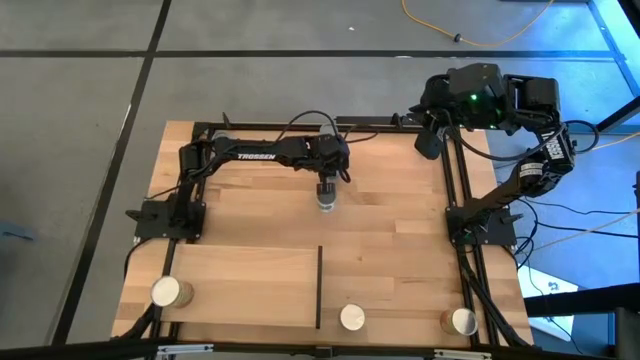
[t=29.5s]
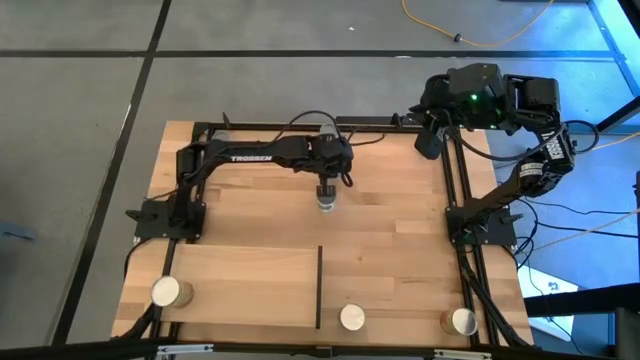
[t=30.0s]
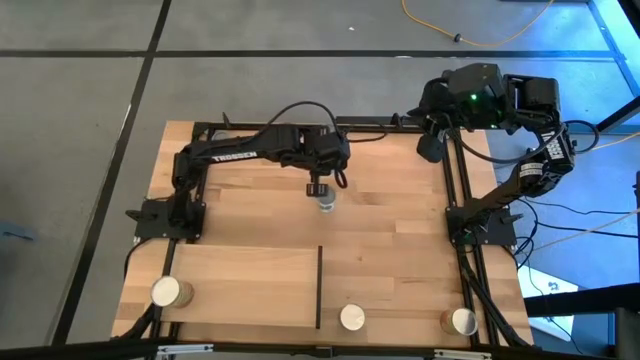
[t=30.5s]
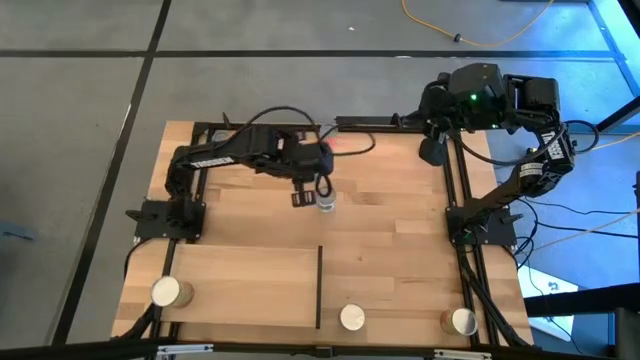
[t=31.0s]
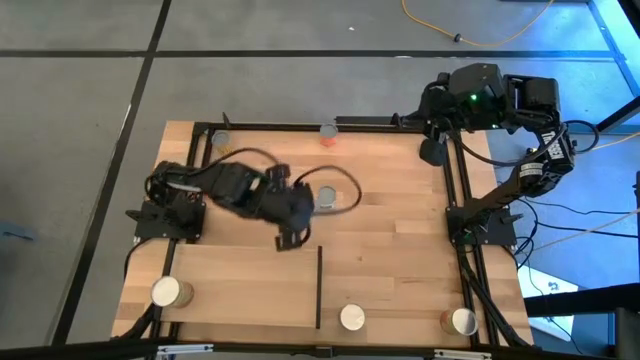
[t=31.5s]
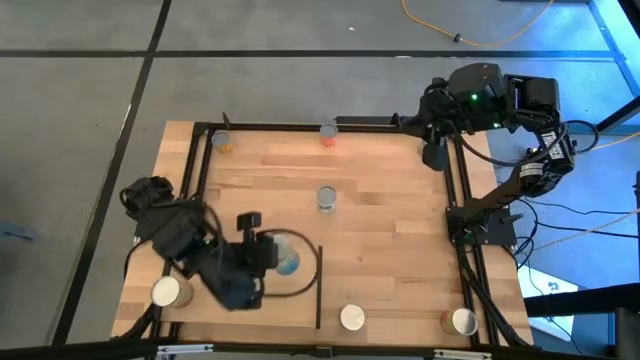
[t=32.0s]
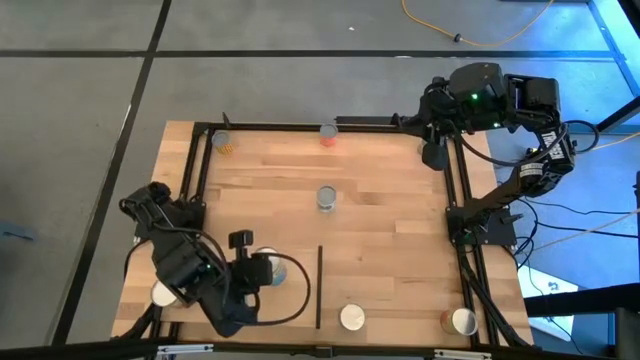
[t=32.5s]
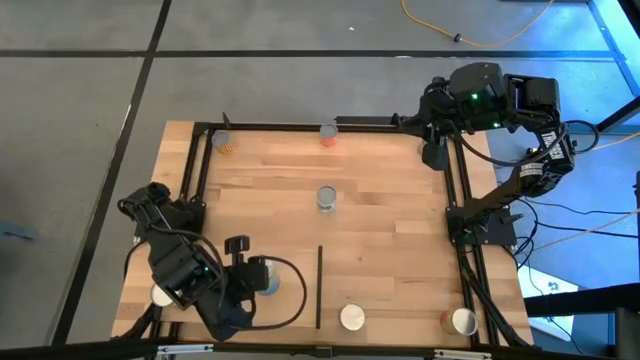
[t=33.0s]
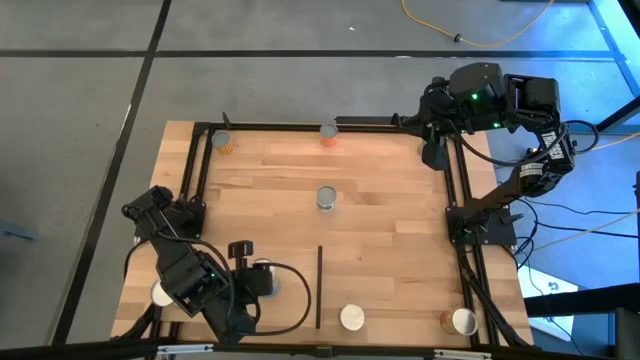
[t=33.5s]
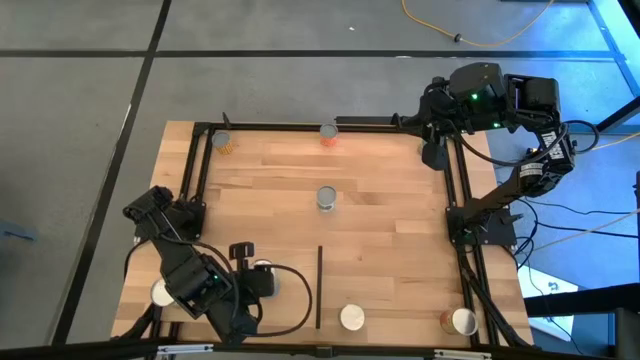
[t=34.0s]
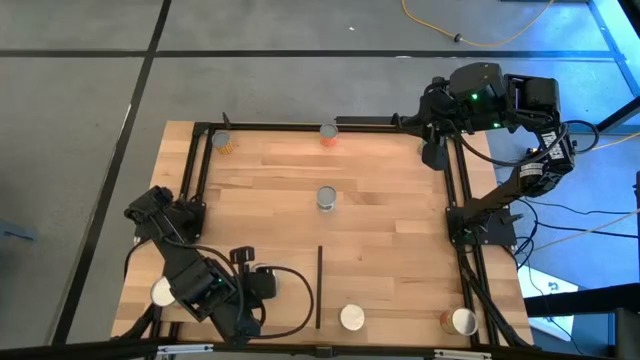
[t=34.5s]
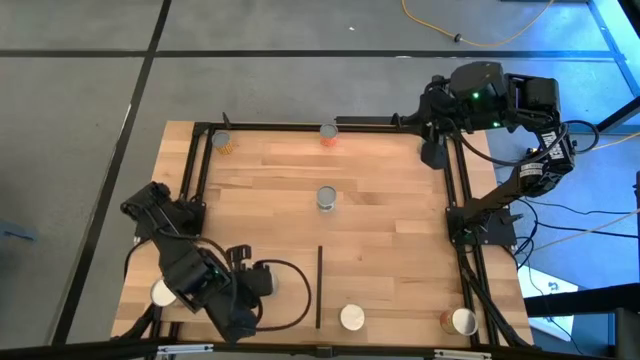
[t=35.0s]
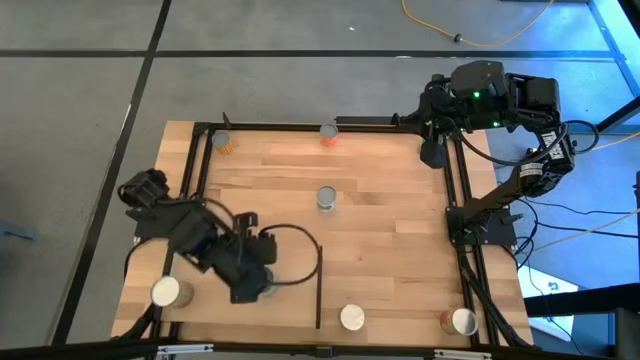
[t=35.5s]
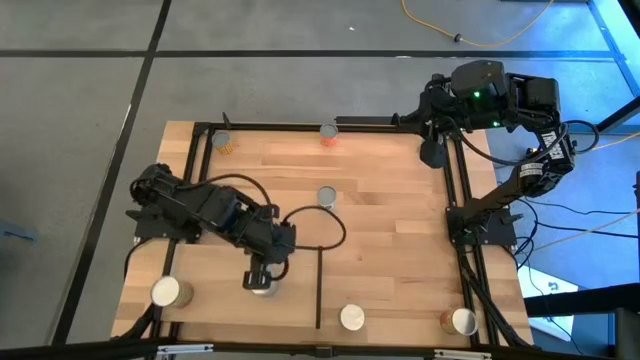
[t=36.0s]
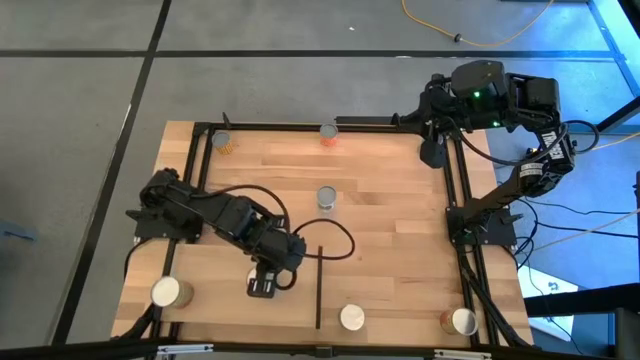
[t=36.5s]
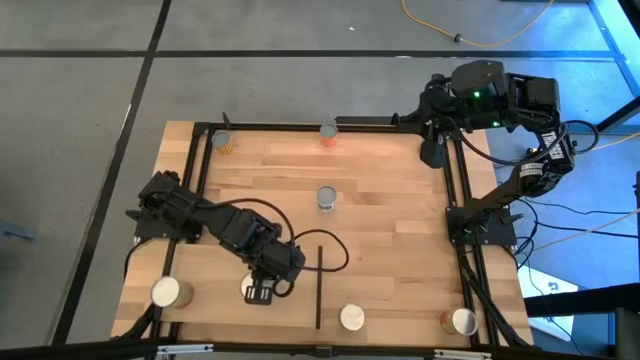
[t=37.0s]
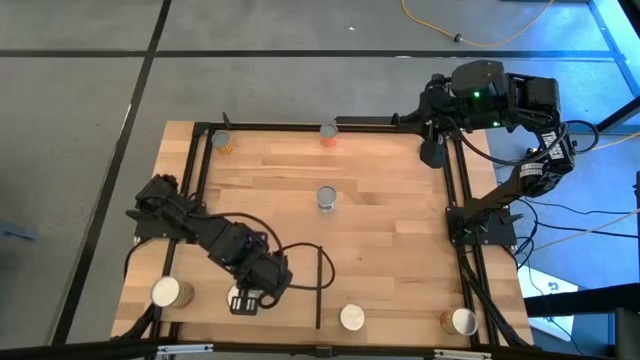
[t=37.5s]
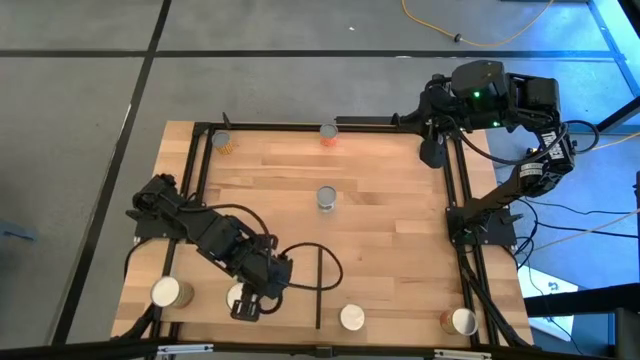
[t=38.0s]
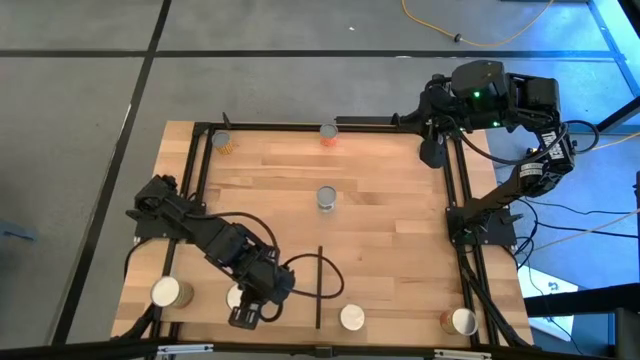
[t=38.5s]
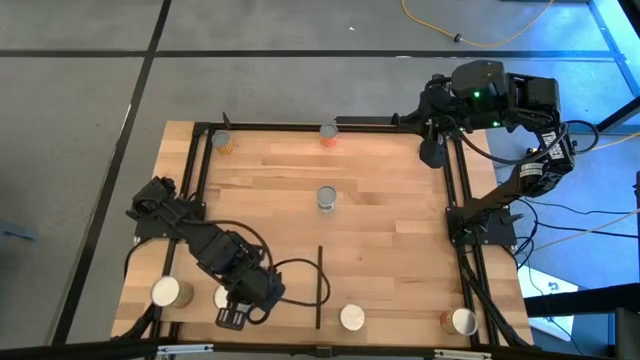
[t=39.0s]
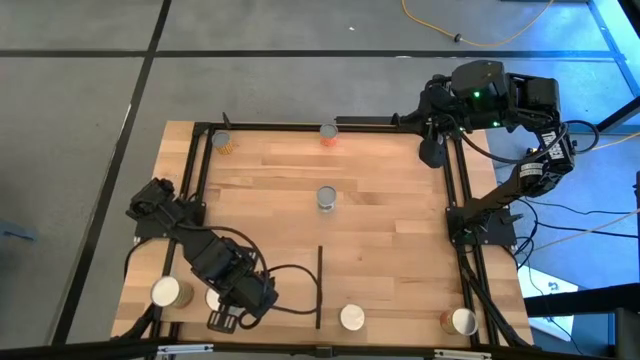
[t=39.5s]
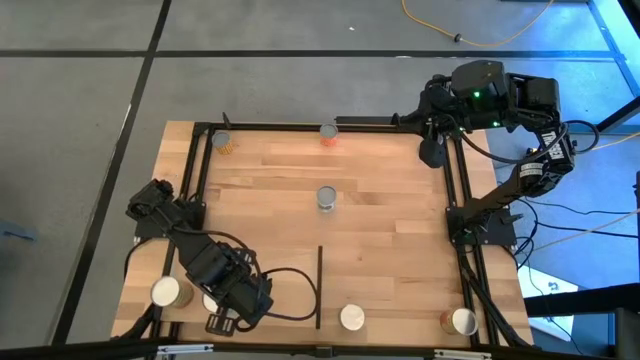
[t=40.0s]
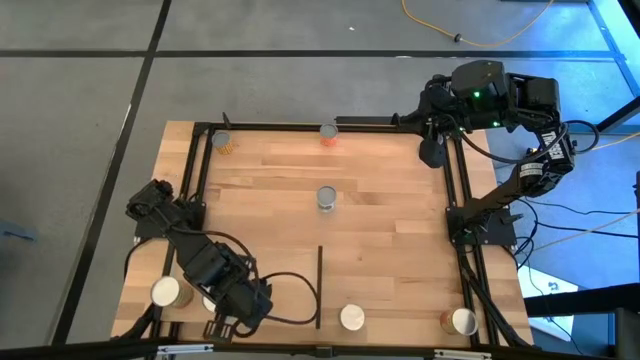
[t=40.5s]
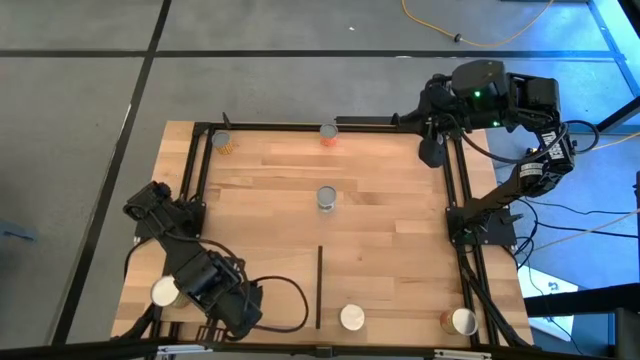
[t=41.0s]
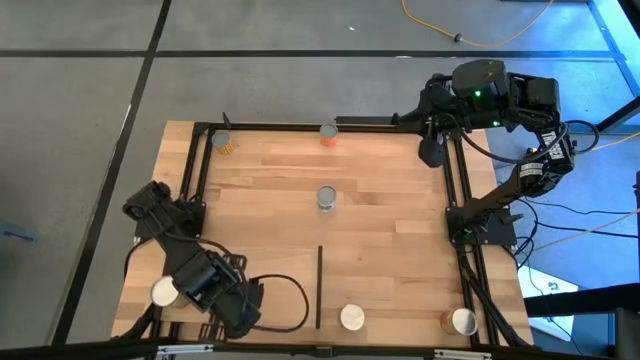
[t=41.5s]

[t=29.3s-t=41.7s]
Task: Pick and place cans onto a shelf
Put the top canned cherries on the shelf

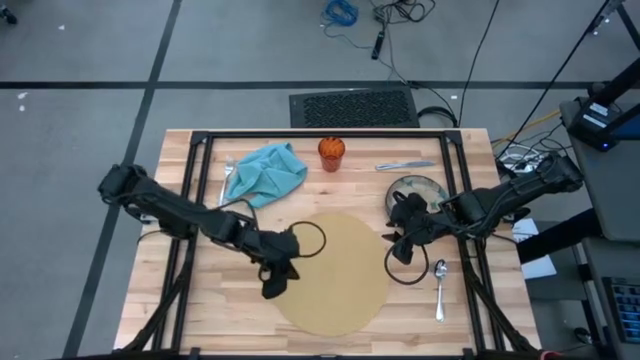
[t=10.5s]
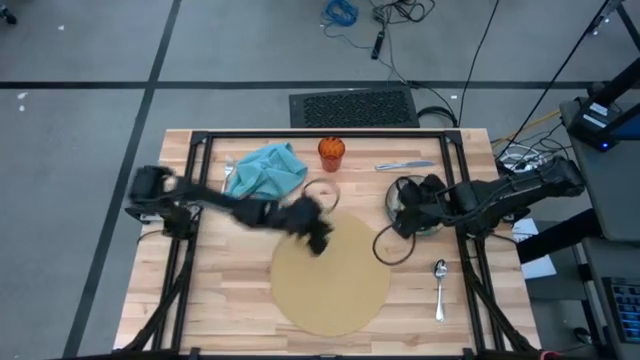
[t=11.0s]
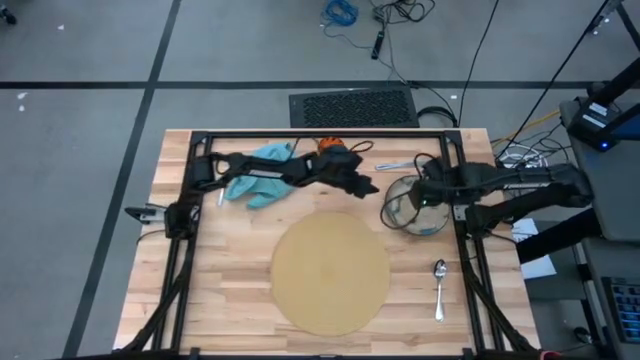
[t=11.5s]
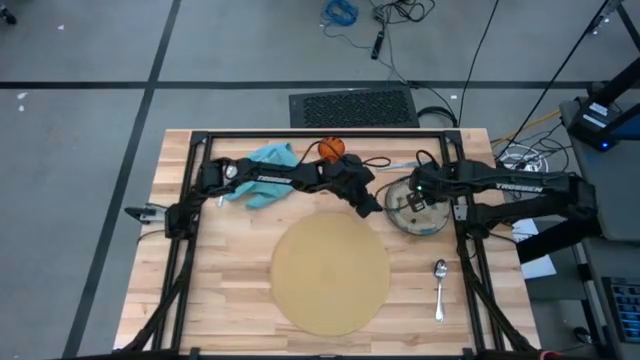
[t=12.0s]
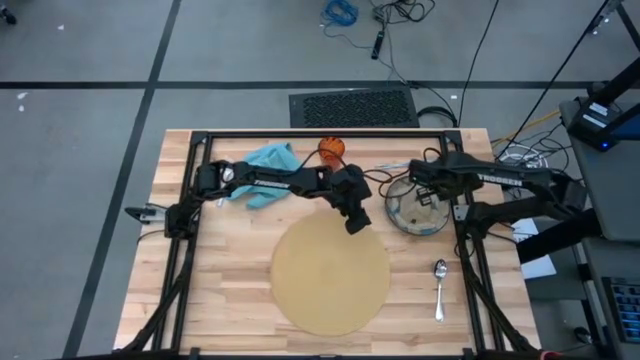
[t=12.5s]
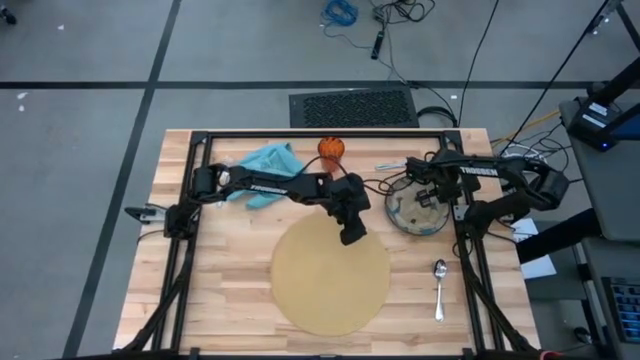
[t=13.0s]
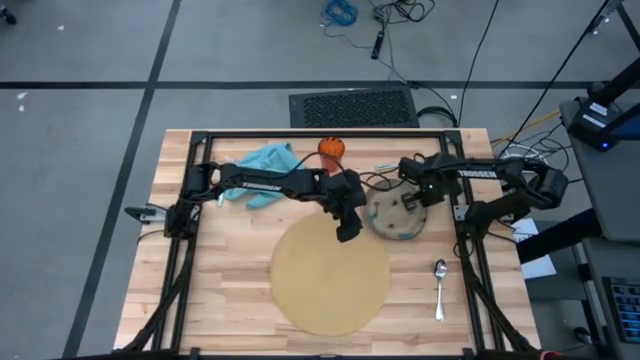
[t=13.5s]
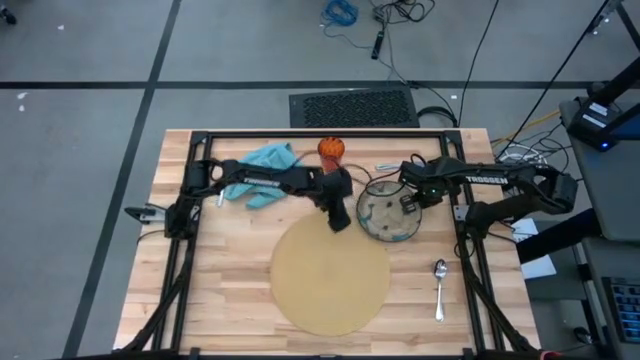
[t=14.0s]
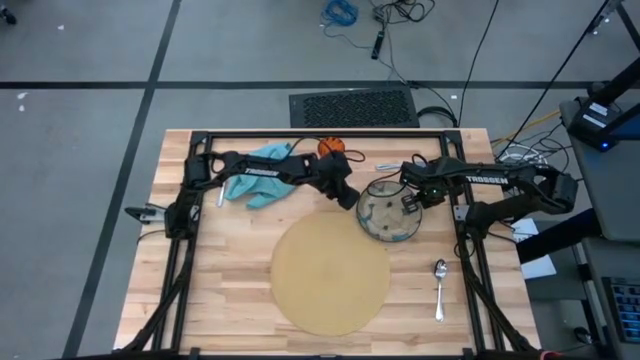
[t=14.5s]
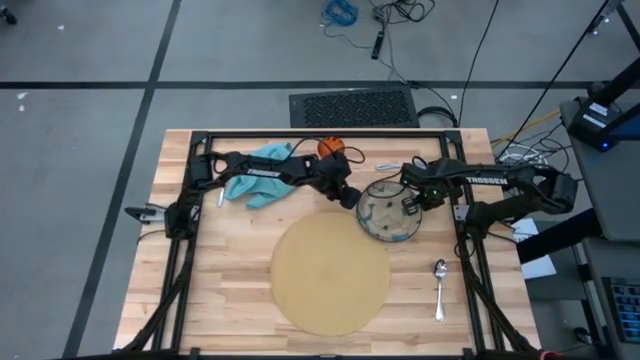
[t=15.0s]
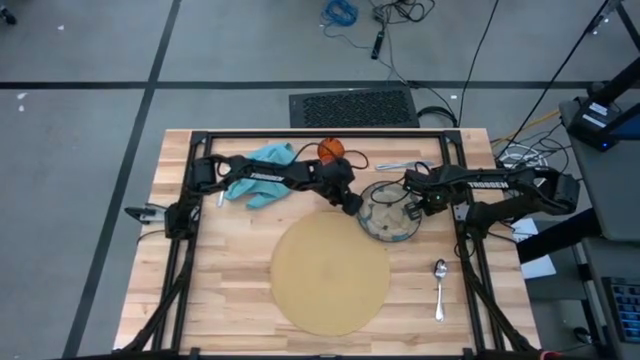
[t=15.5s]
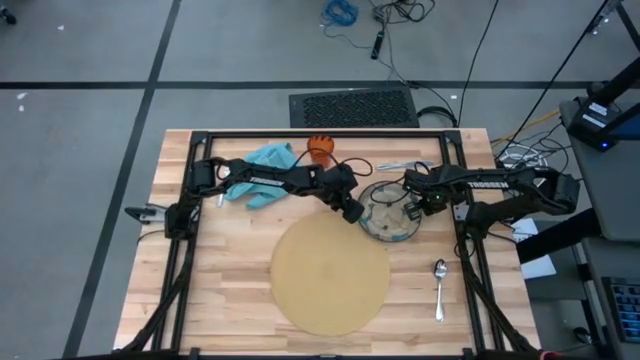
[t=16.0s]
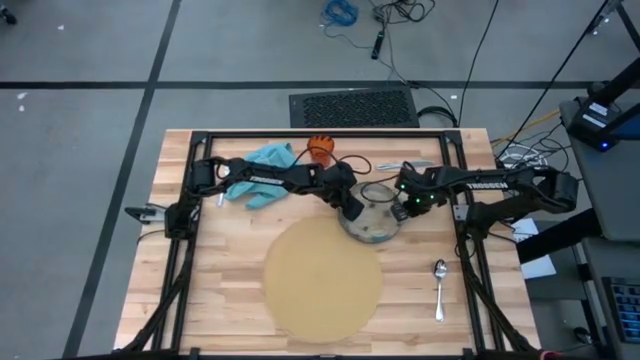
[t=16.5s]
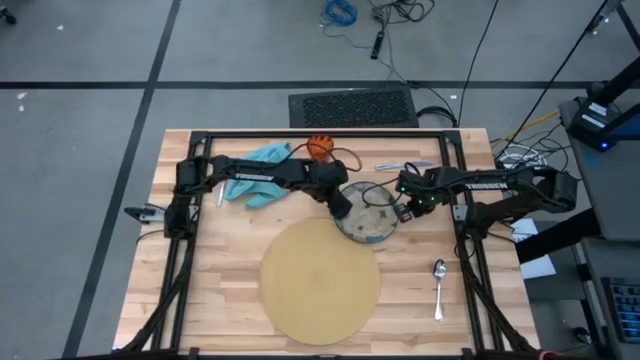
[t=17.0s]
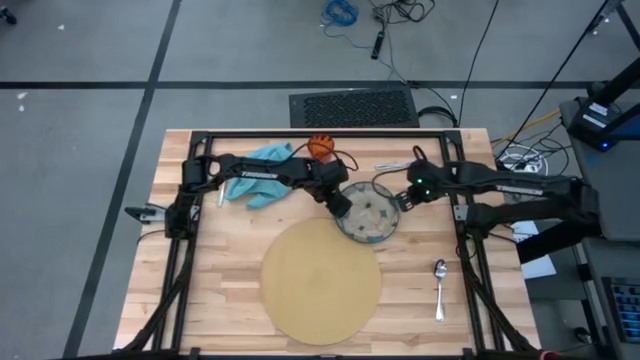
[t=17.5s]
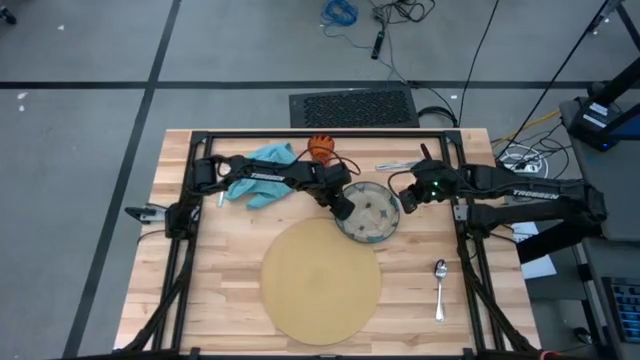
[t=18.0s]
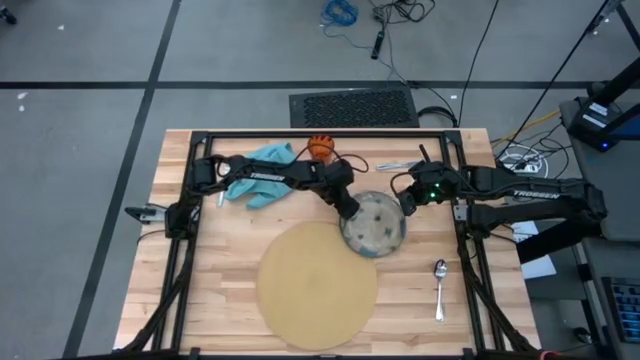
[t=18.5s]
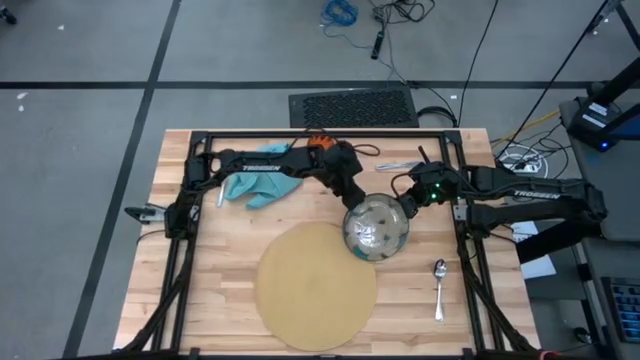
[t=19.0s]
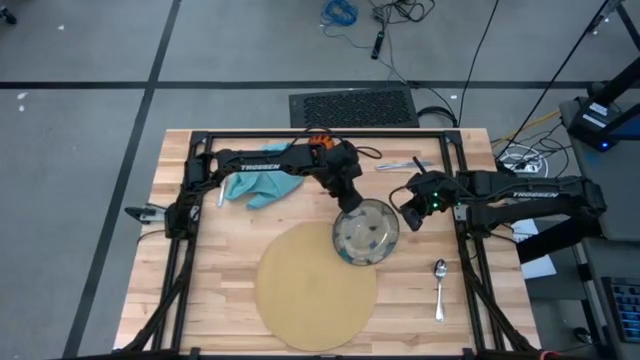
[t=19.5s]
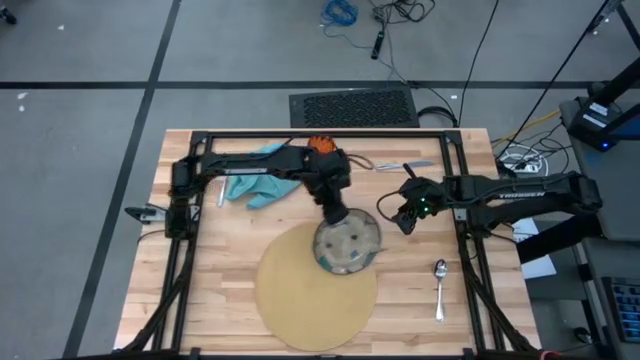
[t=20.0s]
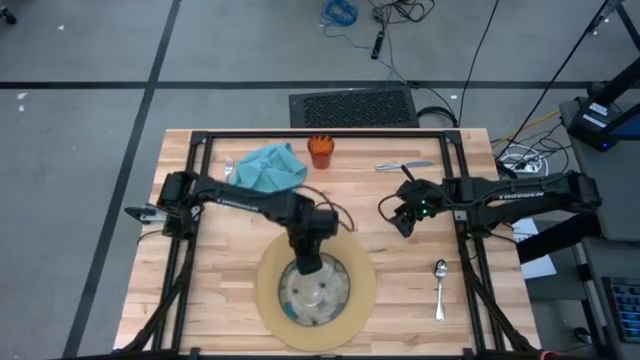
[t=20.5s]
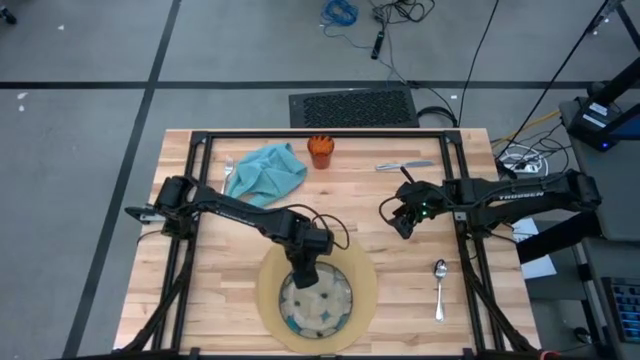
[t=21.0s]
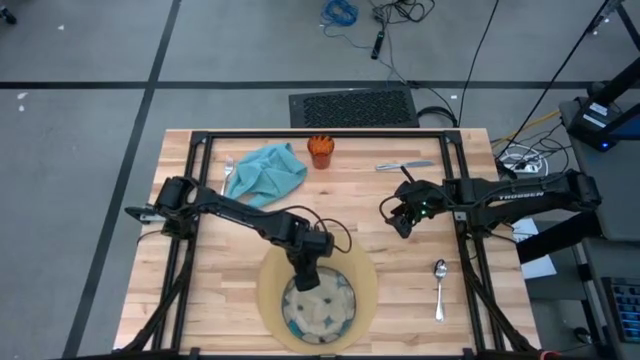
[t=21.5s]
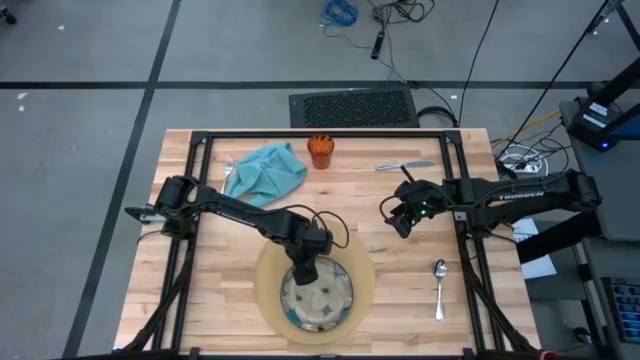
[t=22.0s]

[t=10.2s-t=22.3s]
Task: Set table place
Put the colored plate on the beige table mat
